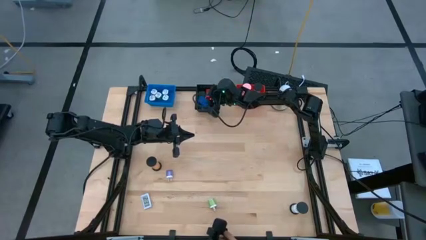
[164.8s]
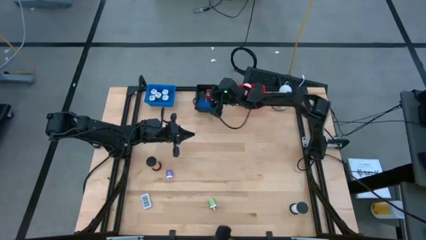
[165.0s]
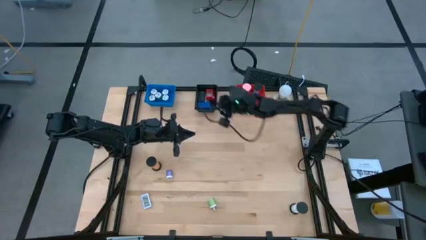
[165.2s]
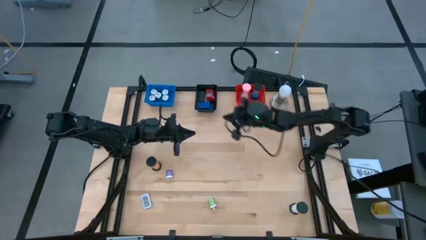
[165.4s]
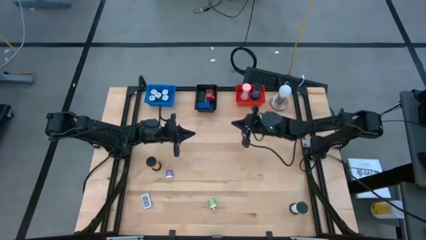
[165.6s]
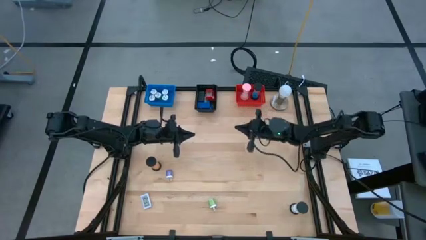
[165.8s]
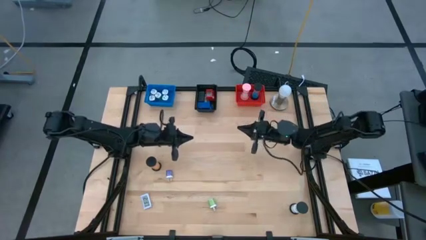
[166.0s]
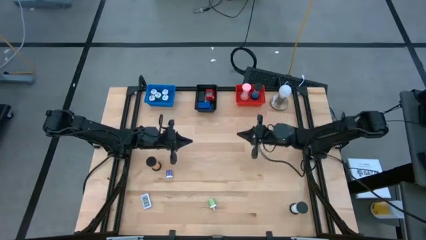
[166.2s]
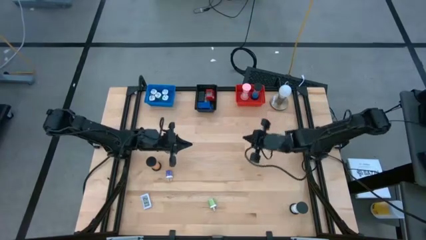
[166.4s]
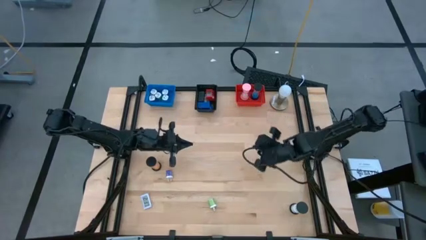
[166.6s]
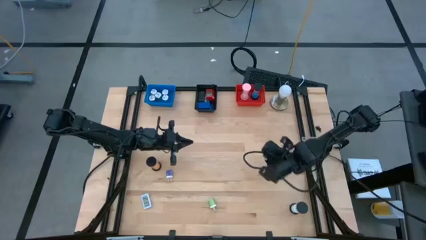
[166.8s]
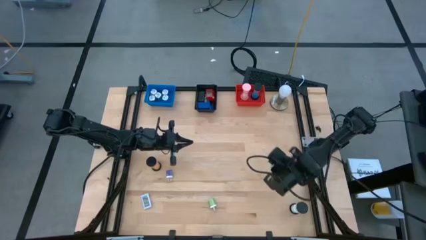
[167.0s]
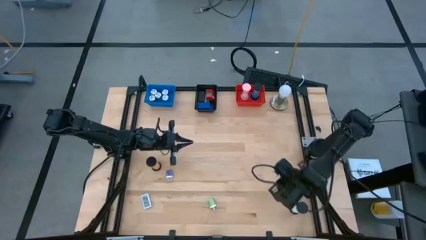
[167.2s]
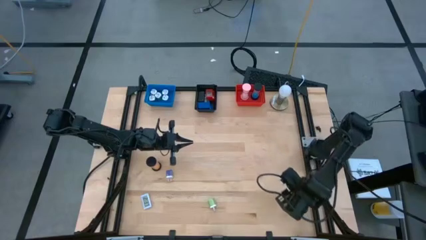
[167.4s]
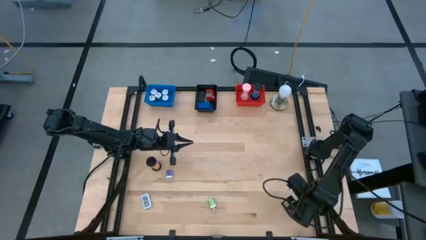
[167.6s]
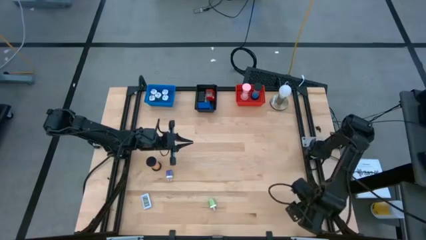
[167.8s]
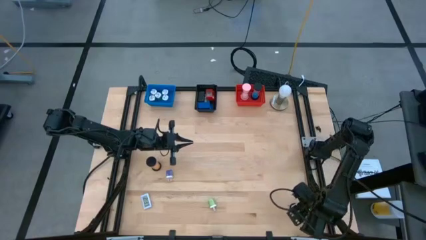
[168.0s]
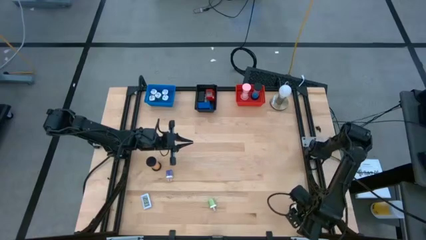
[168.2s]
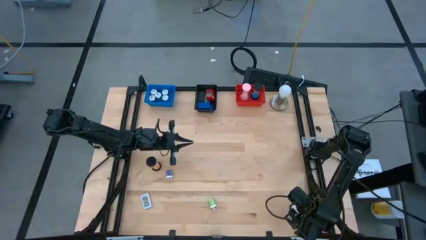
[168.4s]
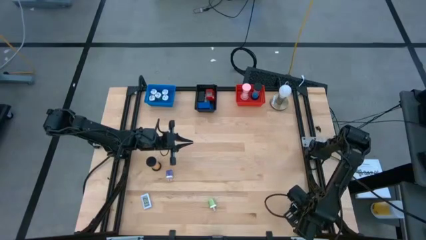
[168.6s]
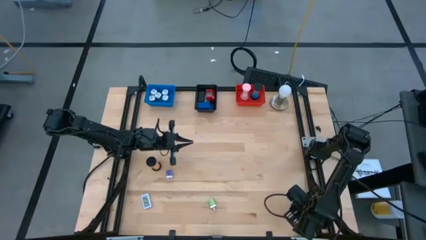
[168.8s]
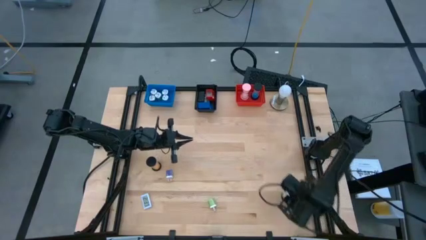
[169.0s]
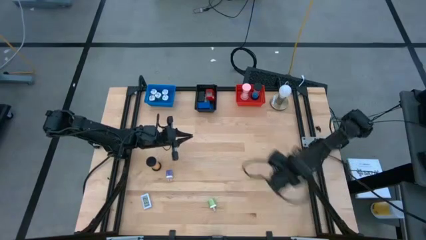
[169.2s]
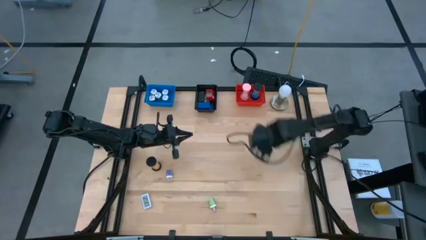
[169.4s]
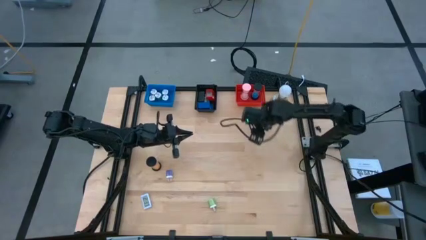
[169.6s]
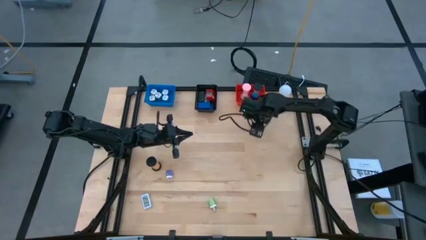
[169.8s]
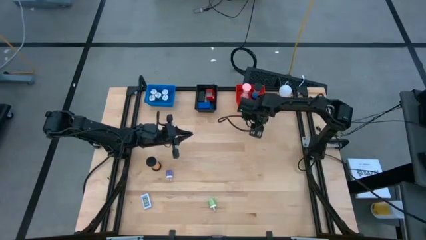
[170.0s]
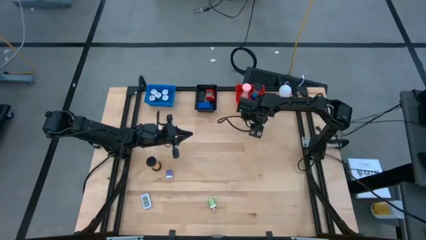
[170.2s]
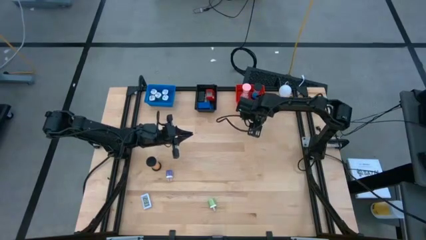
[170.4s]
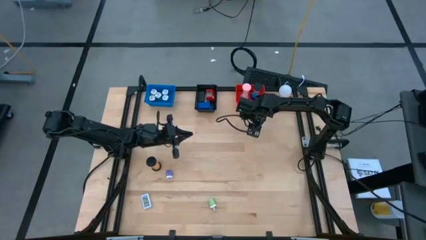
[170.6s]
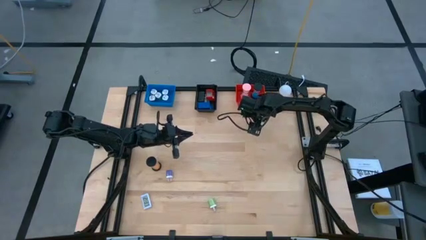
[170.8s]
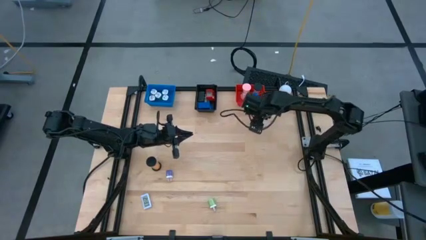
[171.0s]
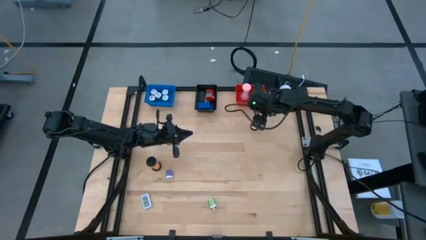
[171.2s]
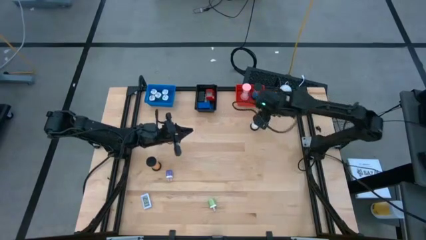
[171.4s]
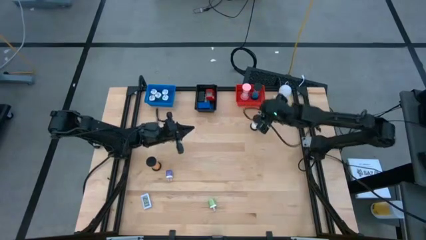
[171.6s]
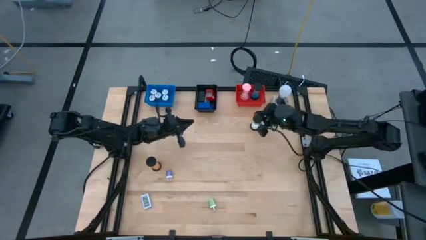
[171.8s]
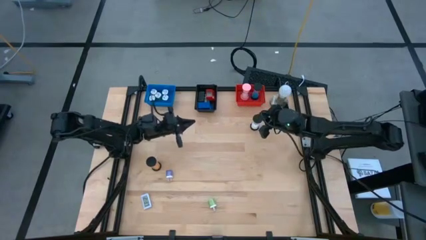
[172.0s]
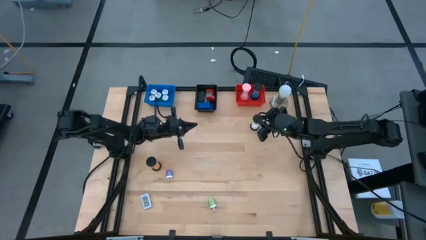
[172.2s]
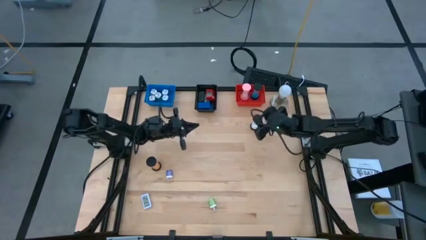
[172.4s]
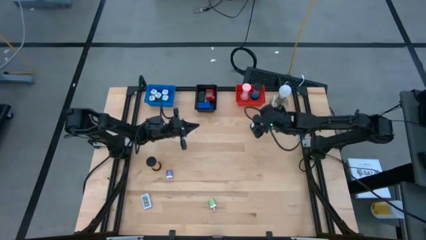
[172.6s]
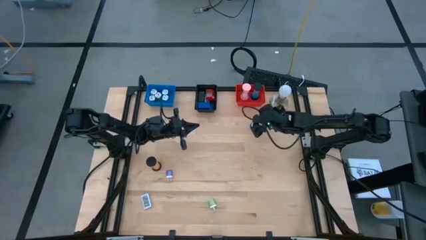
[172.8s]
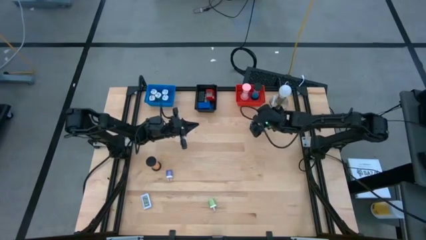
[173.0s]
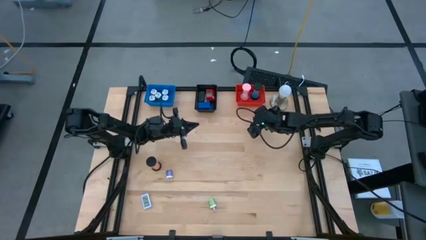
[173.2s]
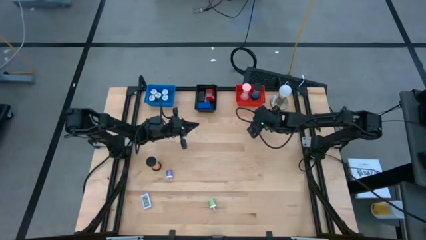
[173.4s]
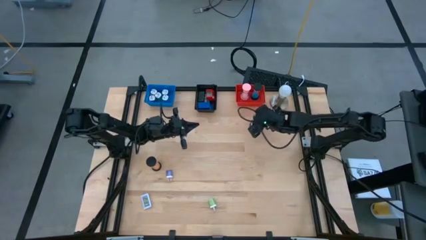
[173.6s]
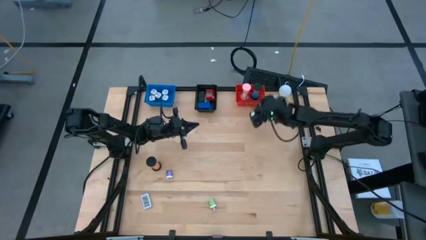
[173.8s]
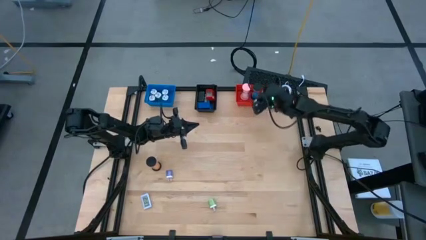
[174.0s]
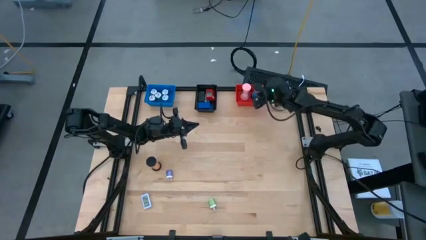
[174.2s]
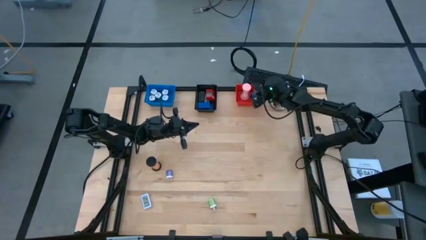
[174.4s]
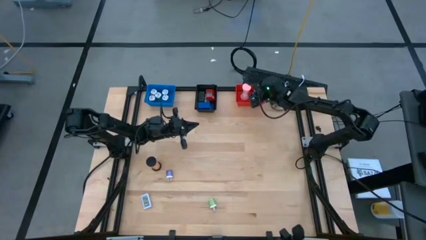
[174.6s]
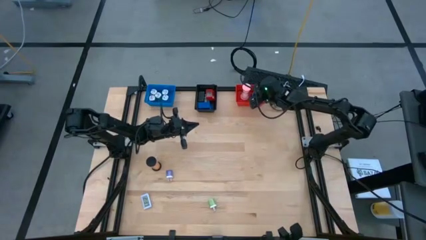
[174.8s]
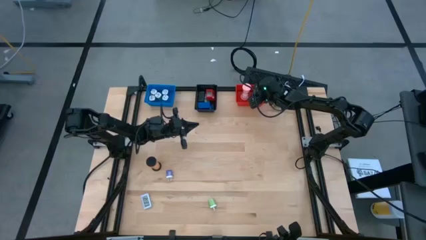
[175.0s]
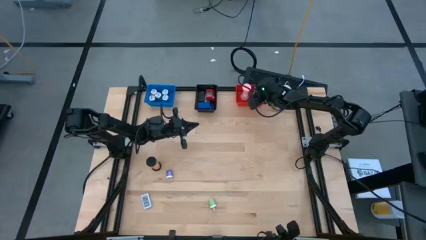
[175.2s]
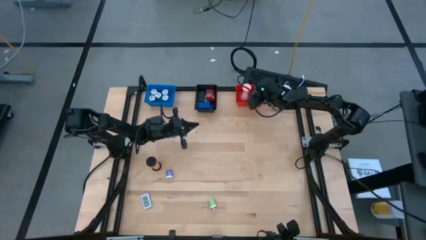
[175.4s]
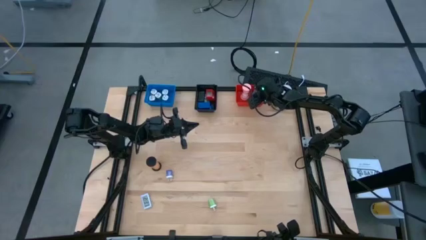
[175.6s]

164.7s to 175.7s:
Task: Pick & Place Office items
Put the bottom black hourglass into the red bin

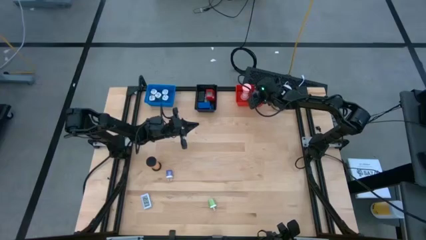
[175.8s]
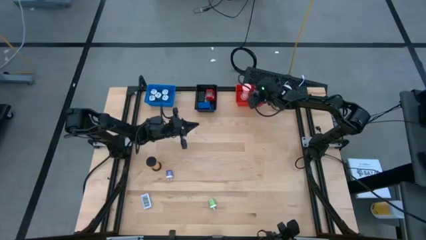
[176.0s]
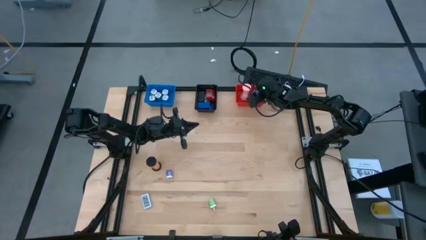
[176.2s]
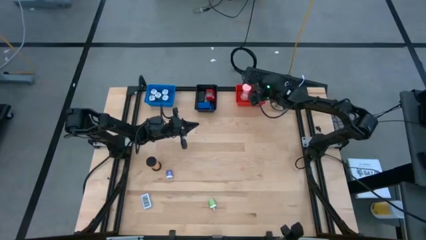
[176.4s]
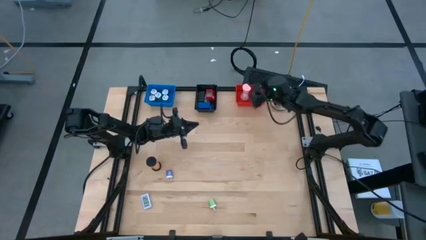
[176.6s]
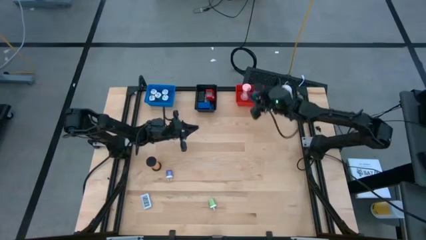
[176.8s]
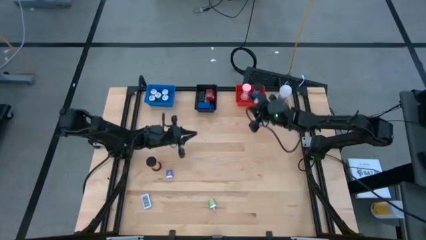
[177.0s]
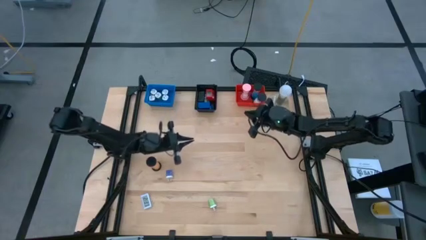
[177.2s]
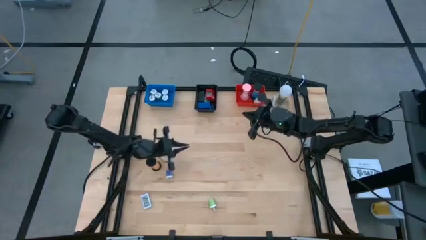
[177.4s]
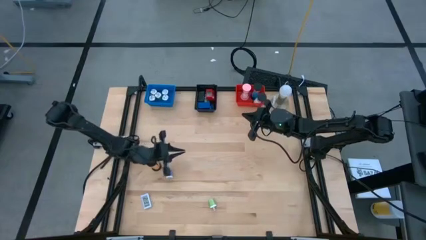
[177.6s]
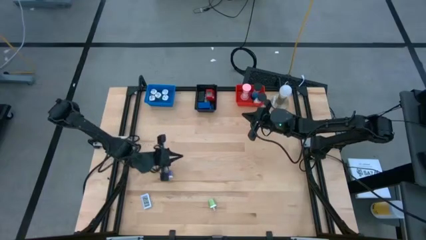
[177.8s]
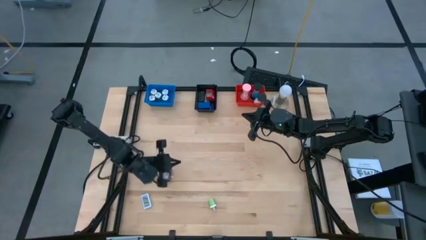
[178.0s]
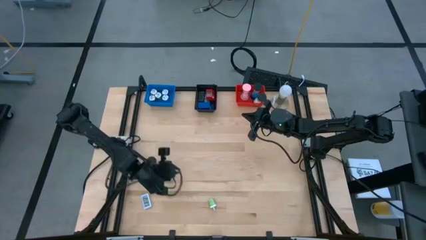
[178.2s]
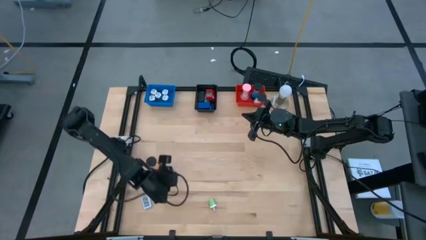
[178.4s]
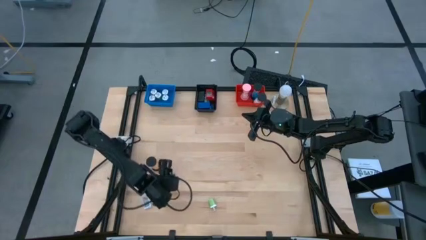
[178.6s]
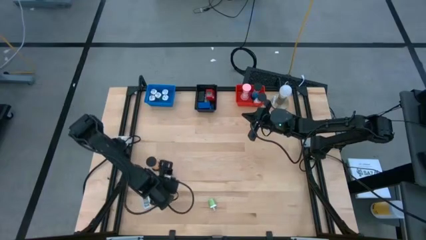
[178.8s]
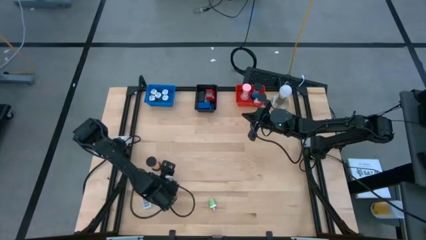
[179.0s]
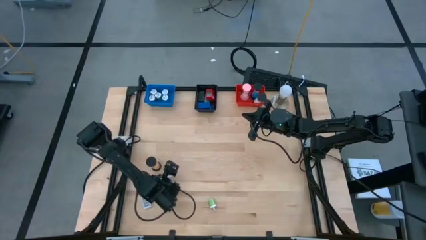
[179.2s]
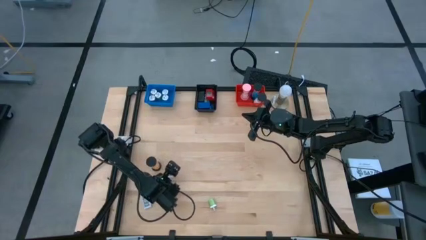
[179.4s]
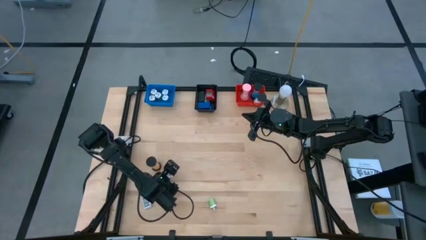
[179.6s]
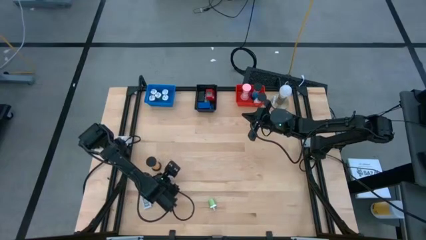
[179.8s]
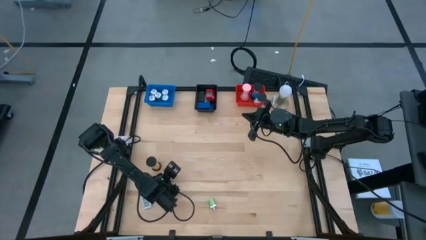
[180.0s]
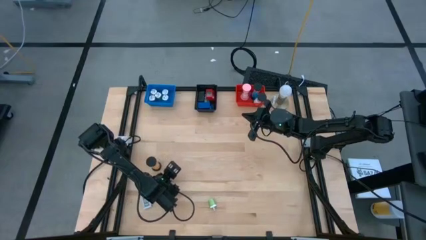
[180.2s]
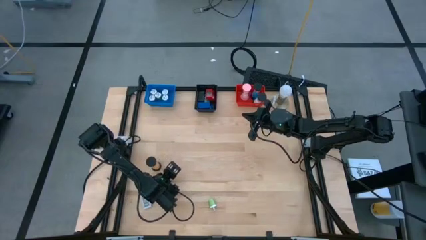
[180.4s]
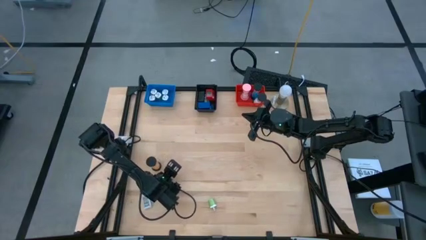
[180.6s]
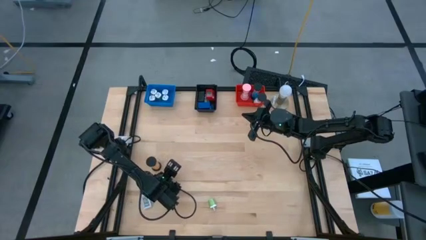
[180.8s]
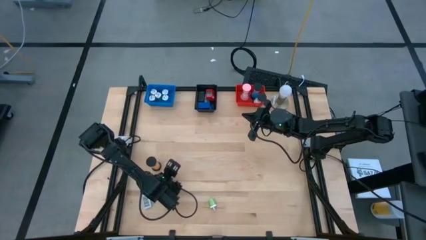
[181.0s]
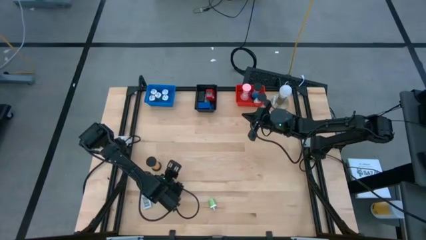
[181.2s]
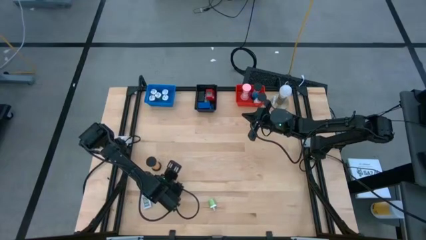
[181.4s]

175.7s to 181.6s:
Put the purple charger adapter into the blue bin
